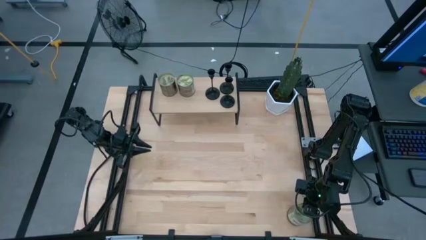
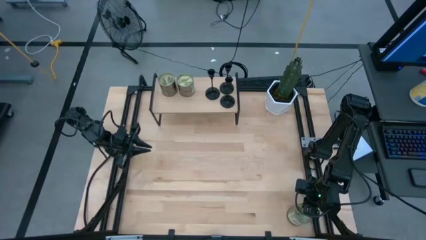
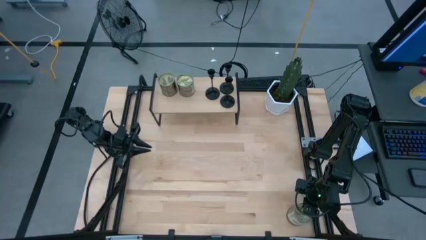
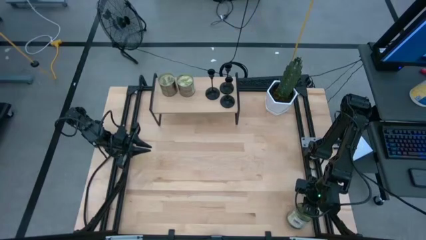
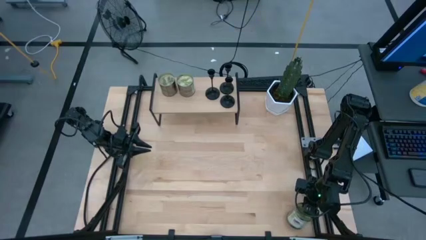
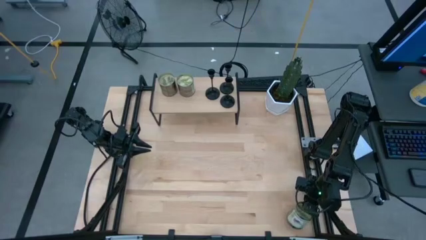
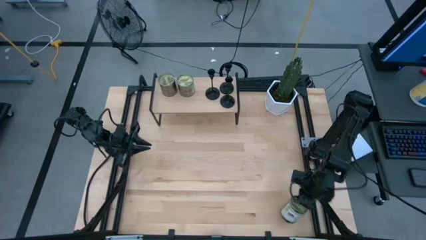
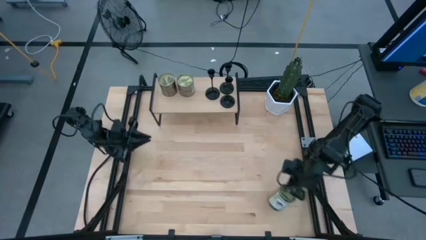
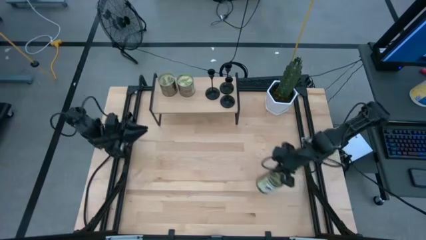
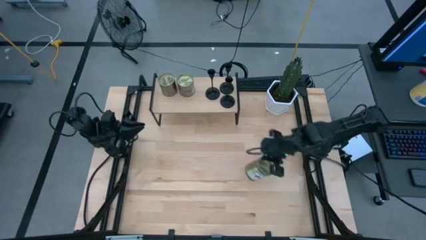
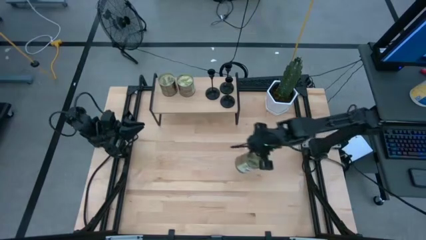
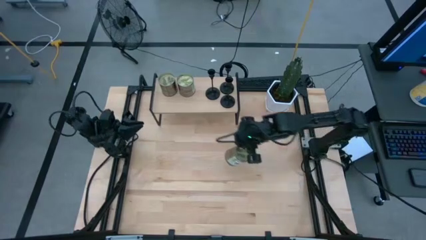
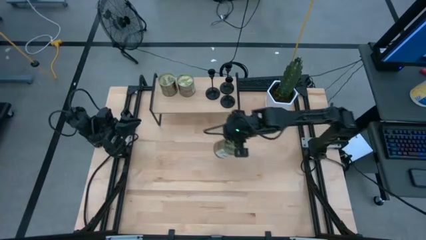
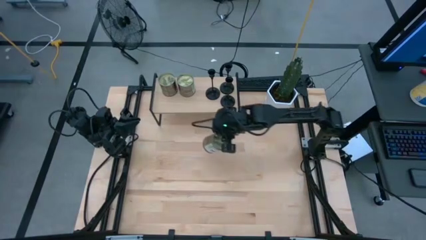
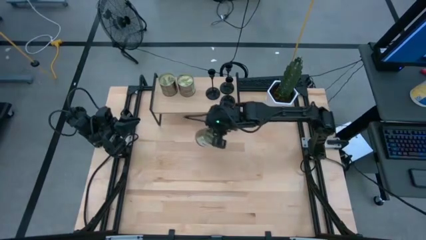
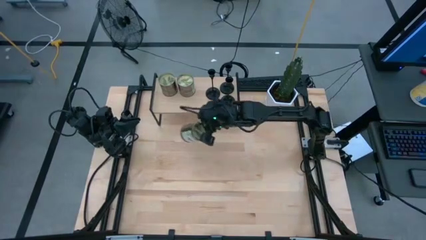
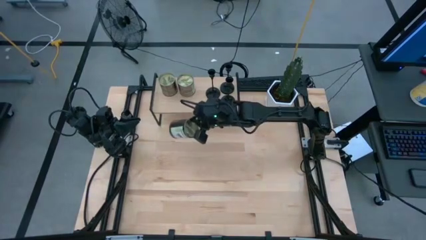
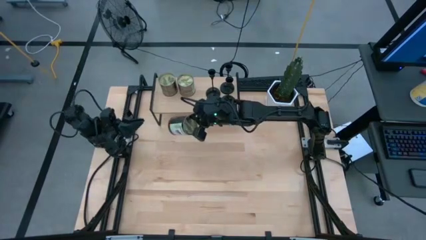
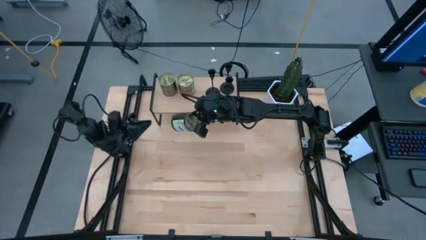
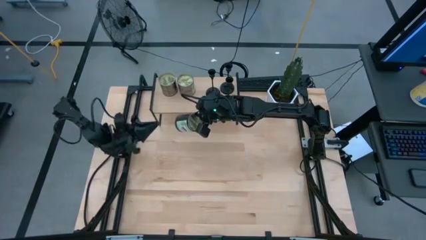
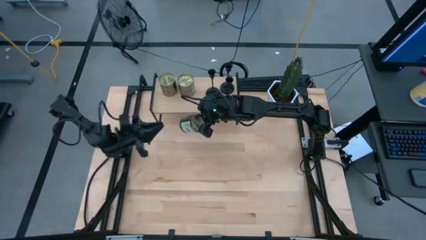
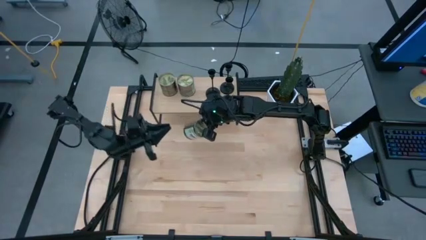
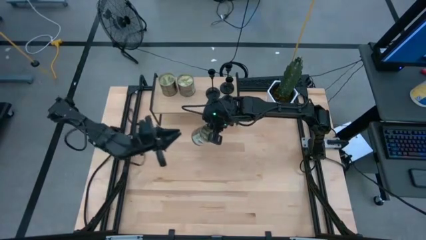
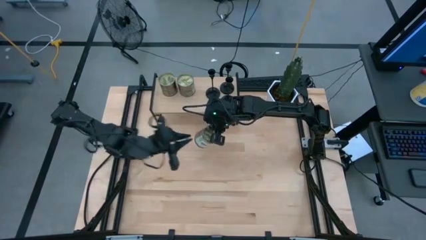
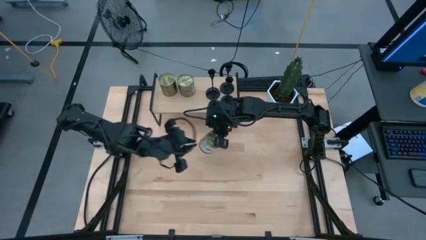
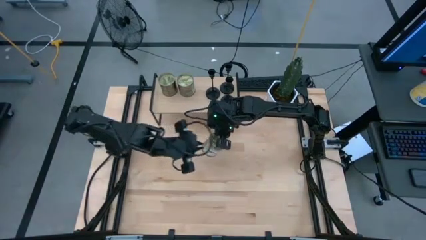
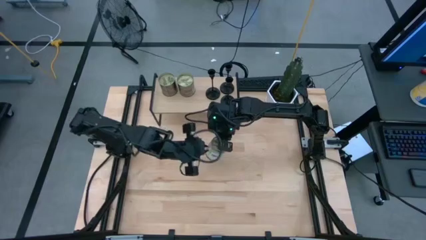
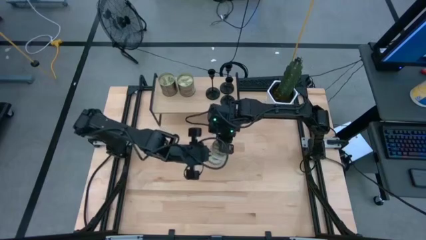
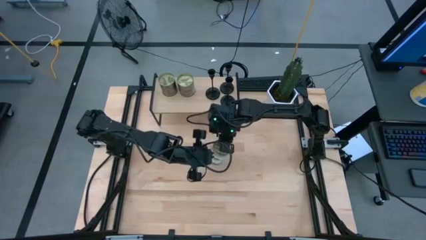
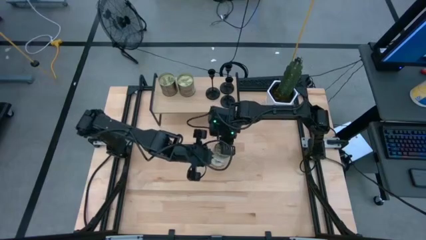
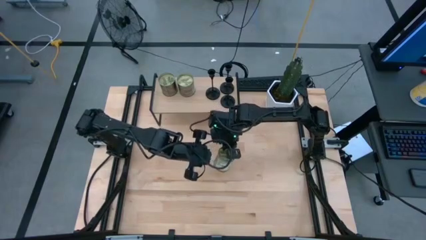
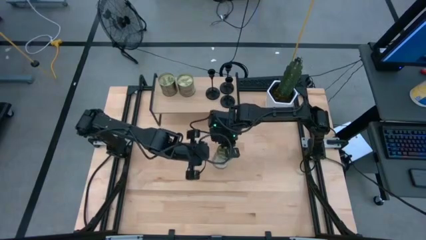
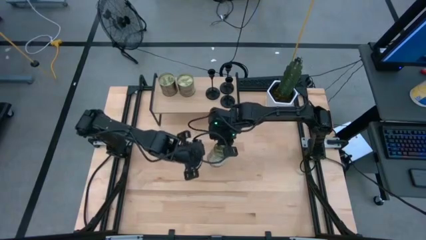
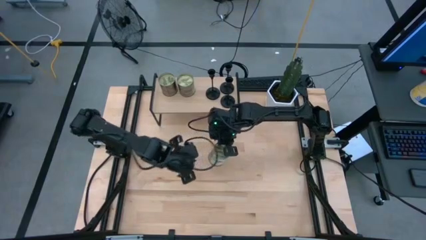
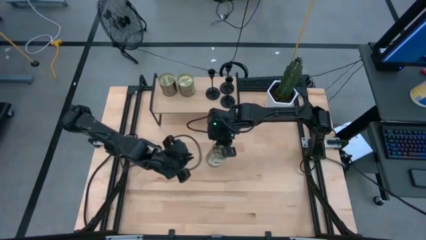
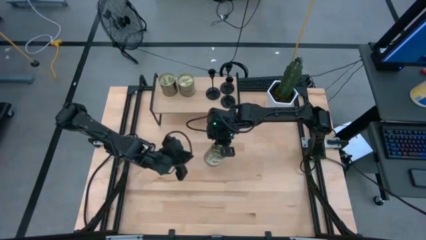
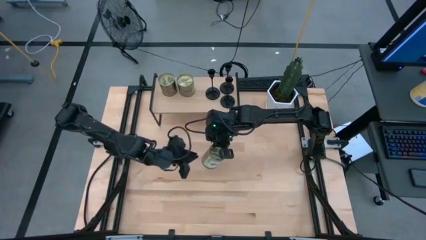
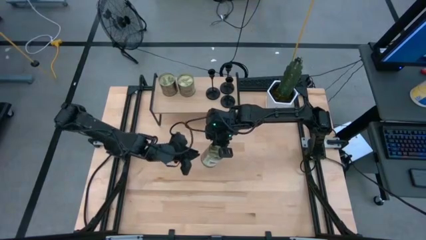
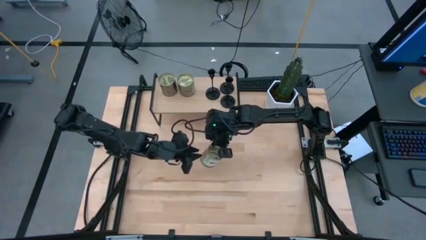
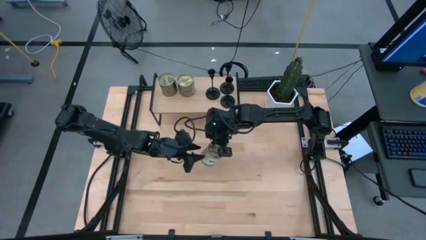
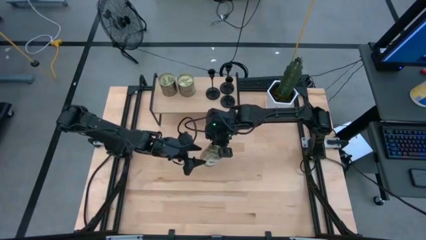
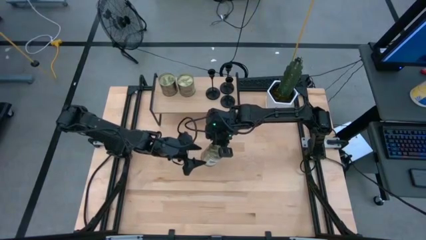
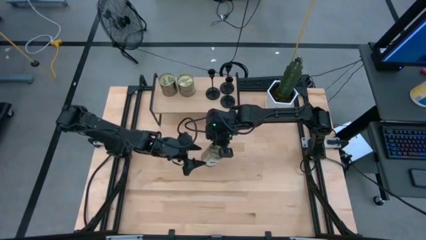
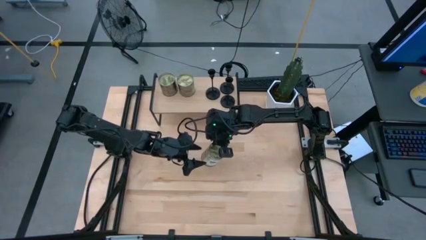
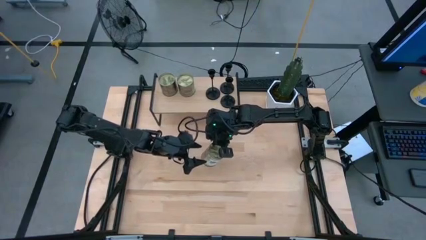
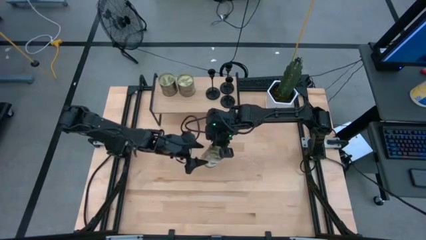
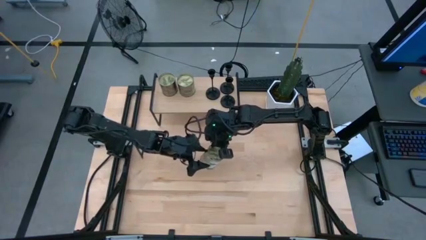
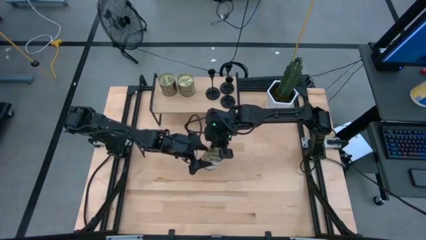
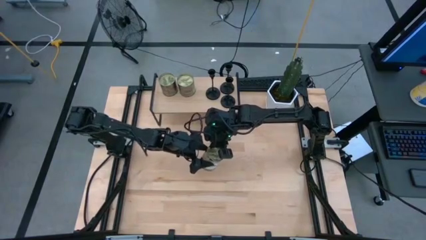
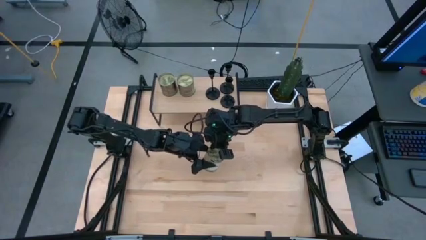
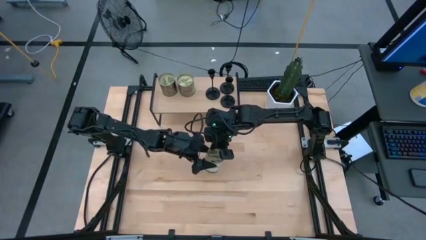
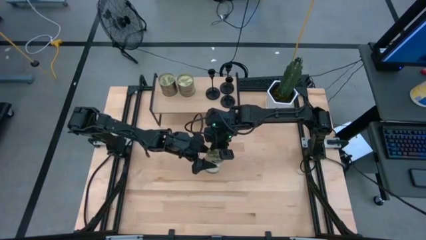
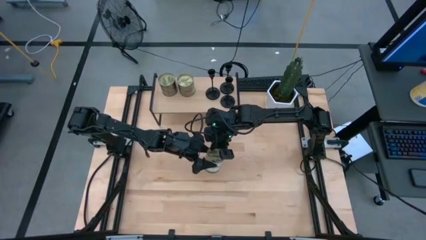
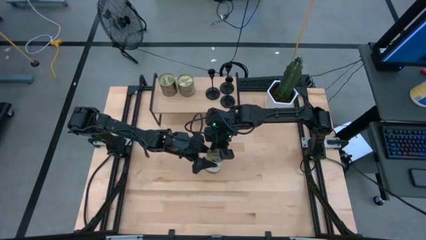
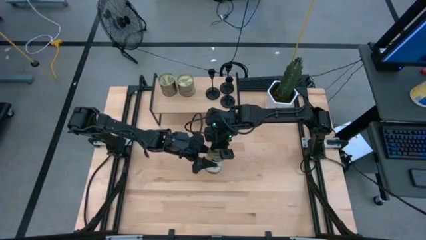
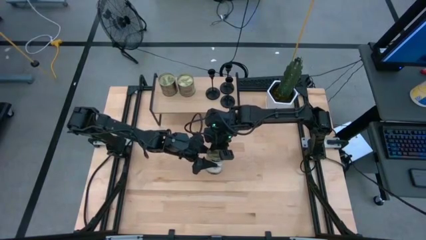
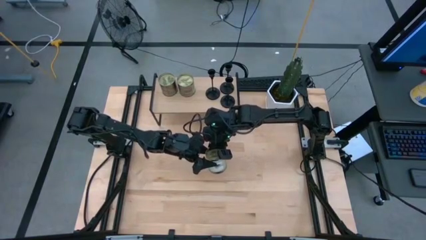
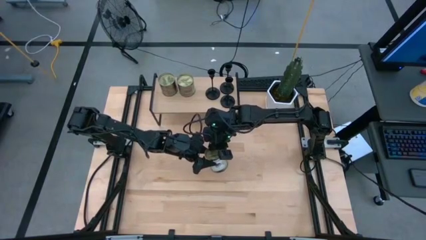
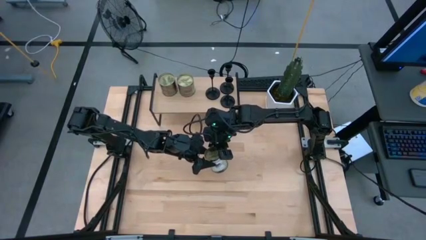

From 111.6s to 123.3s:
Task: Pick & Place candle stick holders
Put the silver scented candle on the shelf

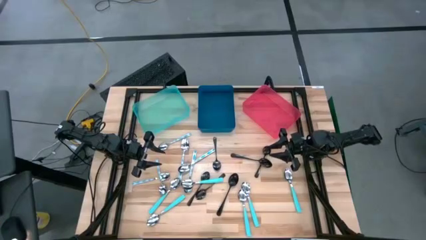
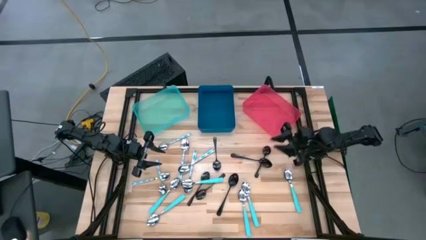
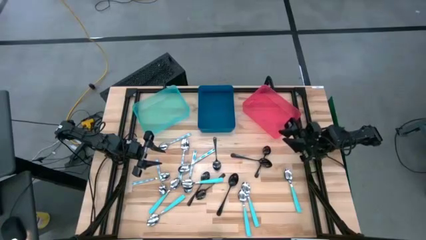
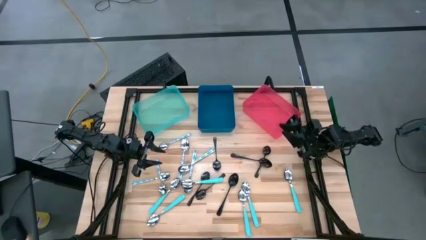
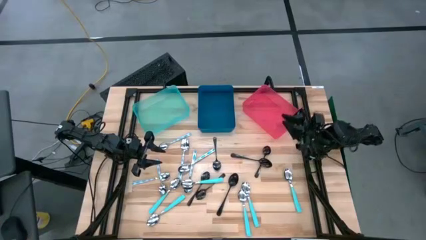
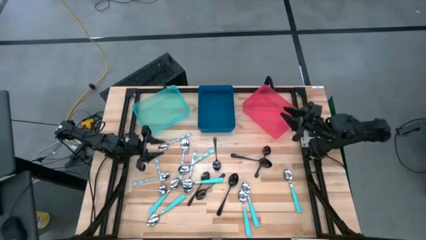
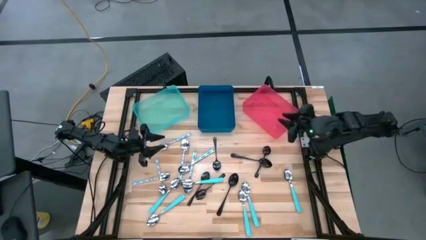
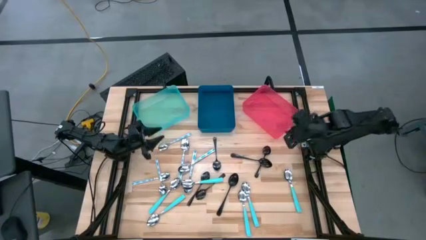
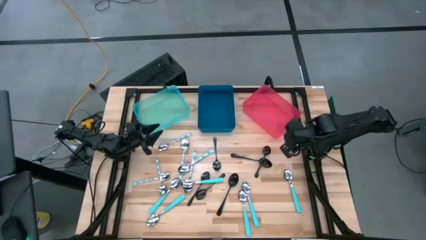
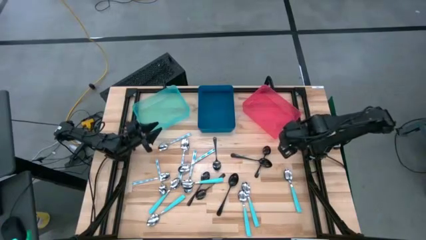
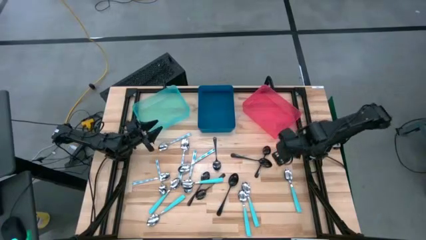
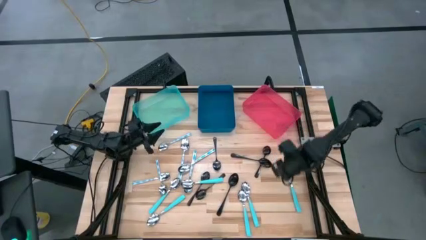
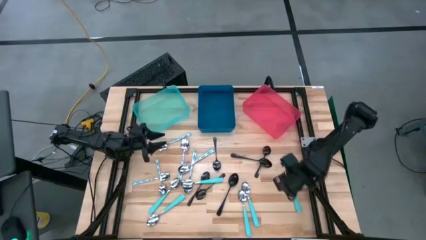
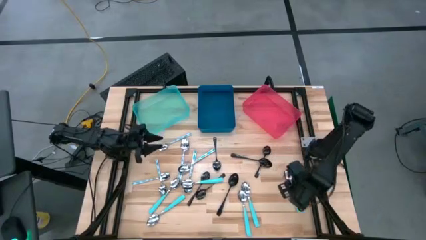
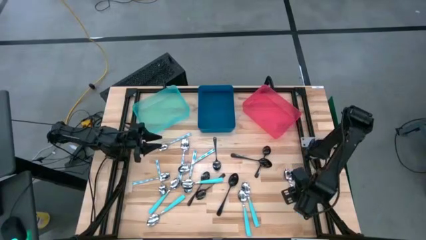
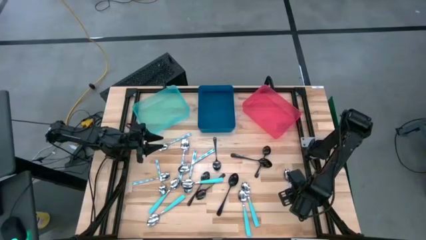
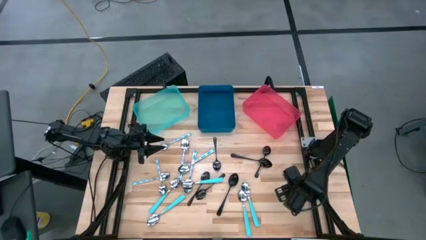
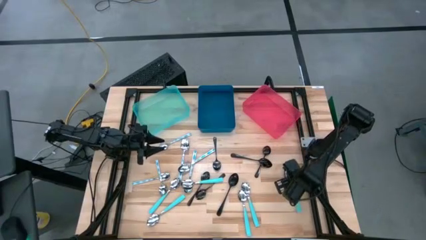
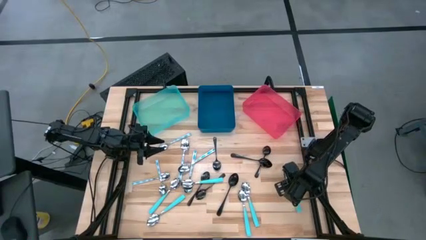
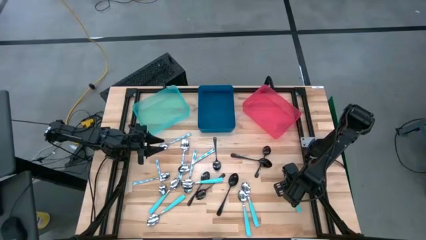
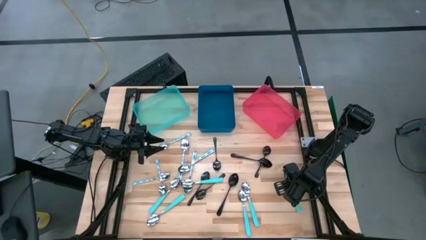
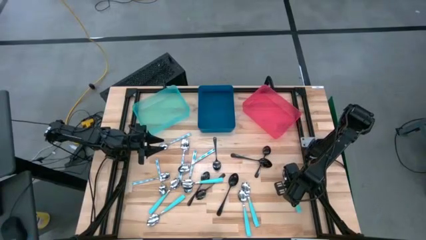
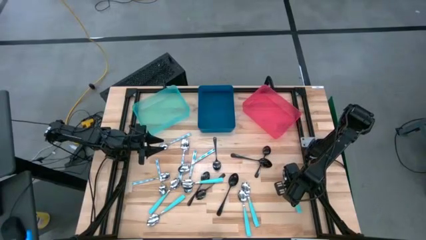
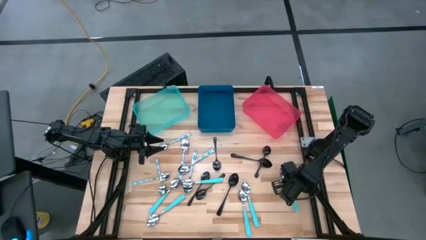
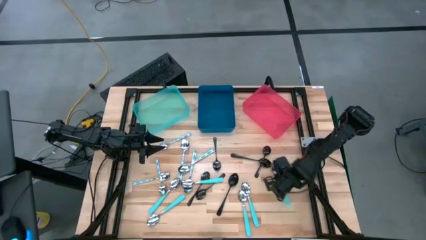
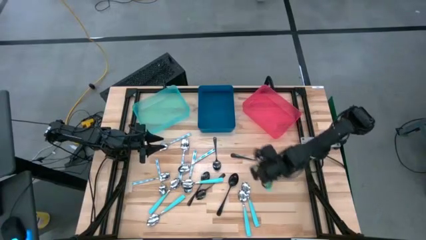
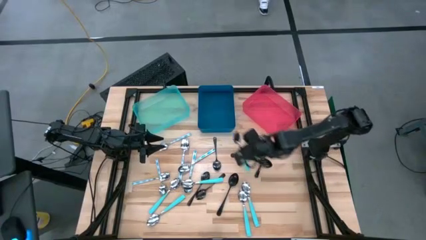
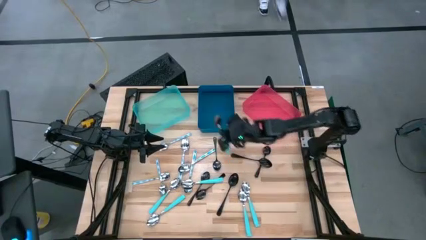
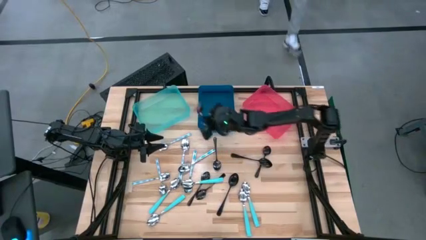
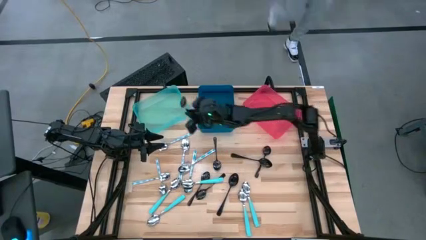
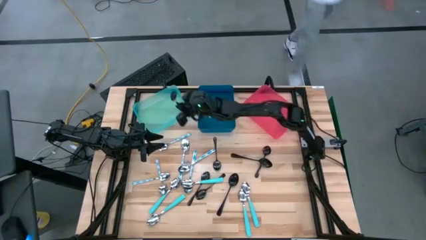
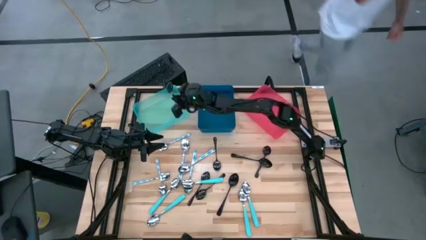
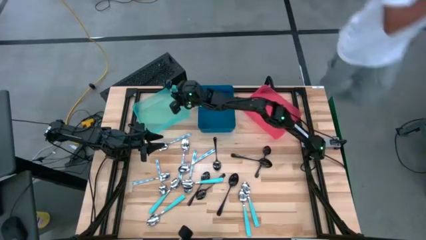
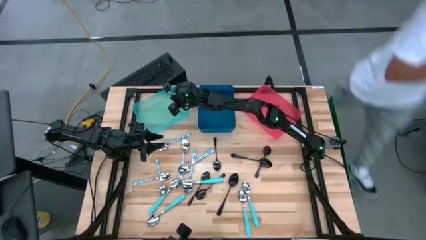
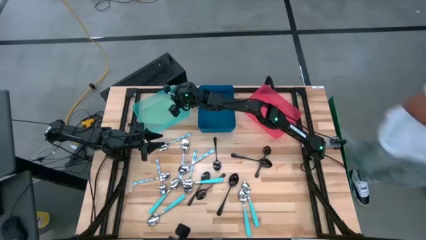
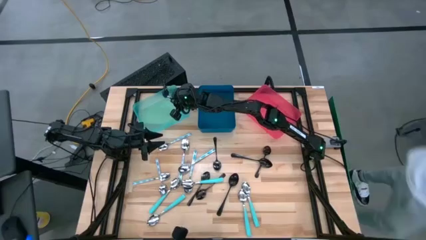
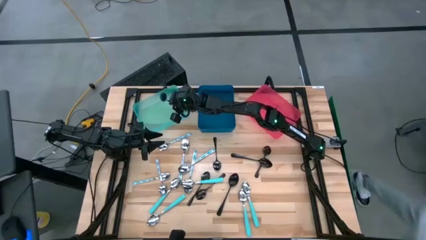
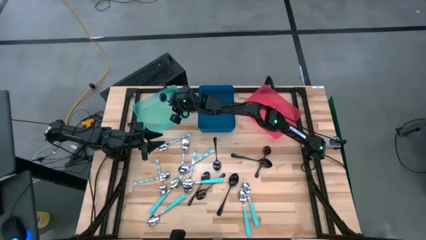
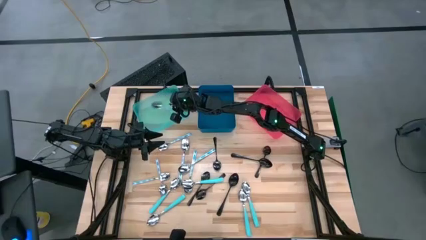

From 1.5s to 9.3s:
Task: Sort silverware by color (type)
Put the blue spoon into the light blue bin
